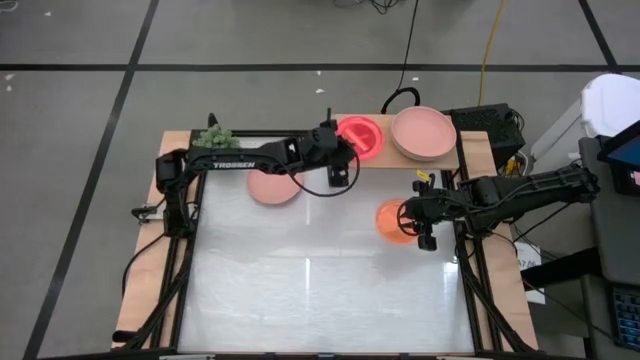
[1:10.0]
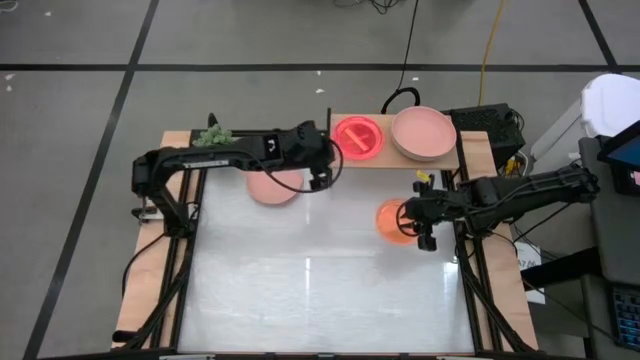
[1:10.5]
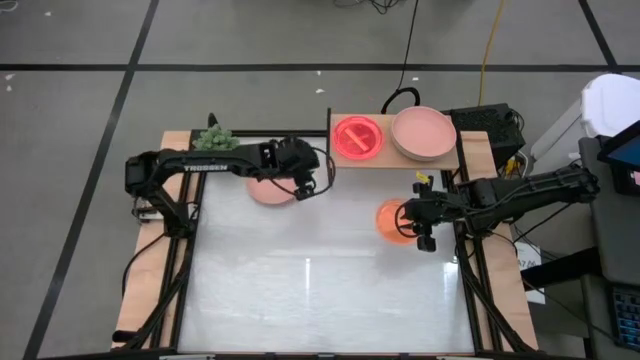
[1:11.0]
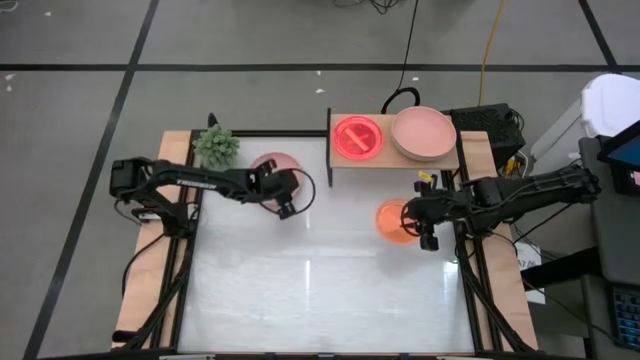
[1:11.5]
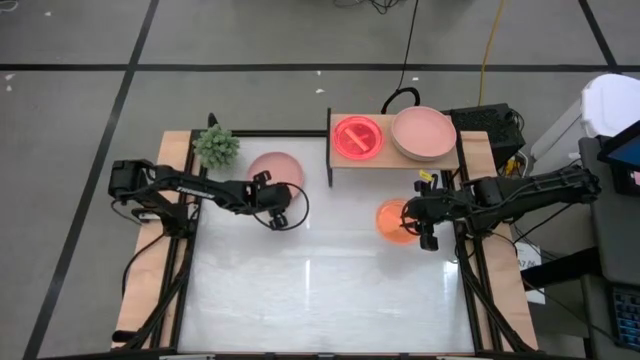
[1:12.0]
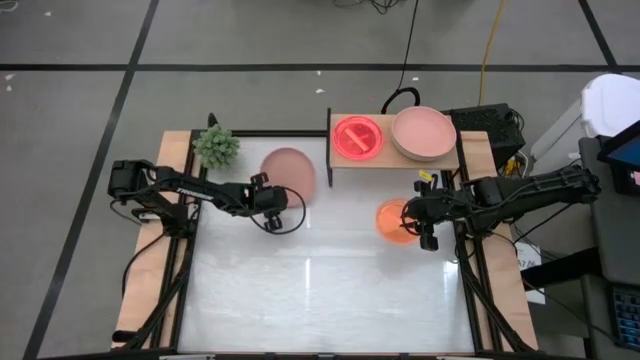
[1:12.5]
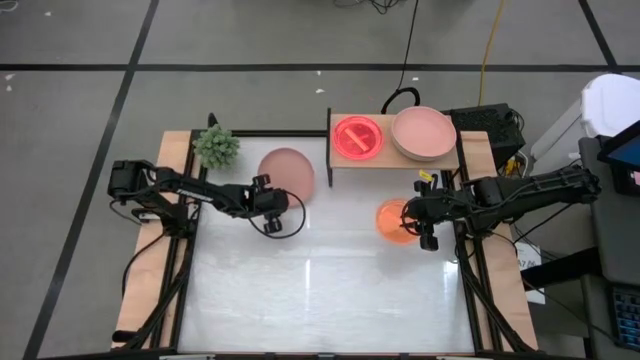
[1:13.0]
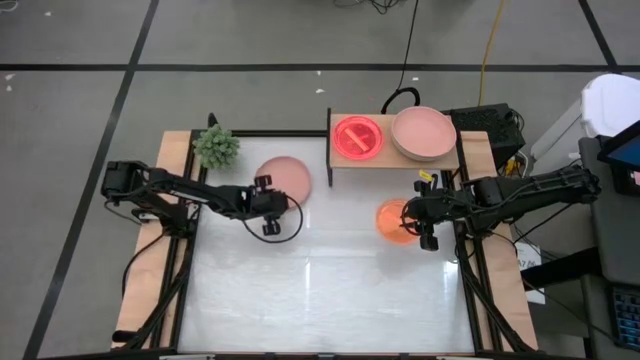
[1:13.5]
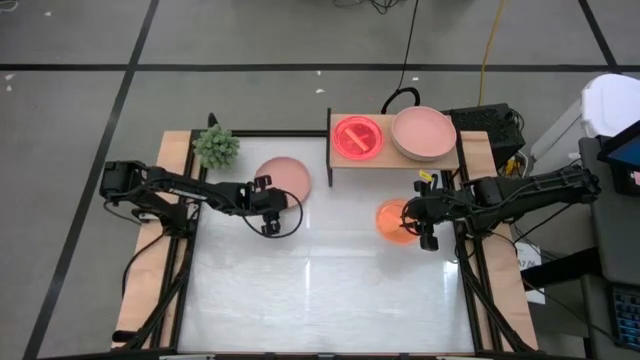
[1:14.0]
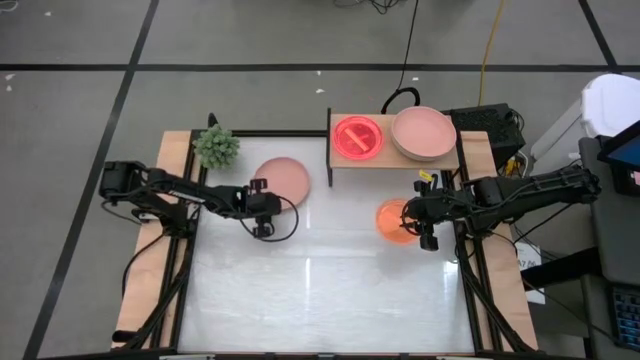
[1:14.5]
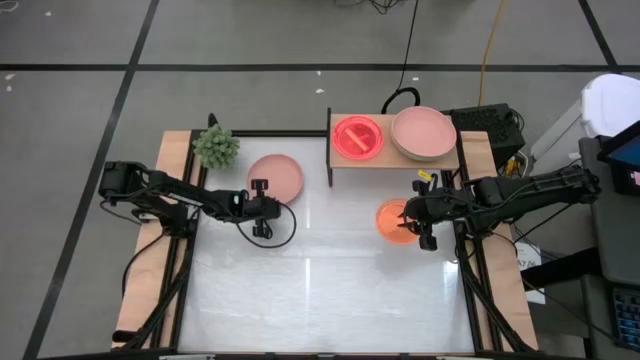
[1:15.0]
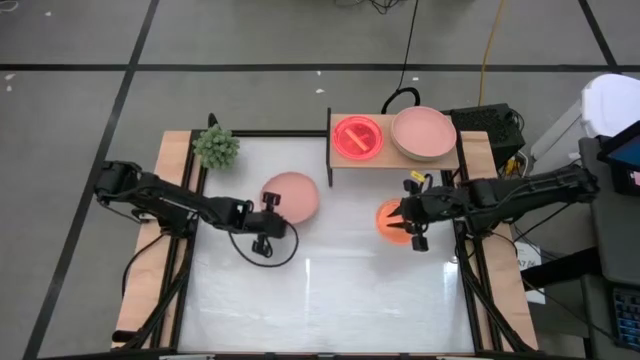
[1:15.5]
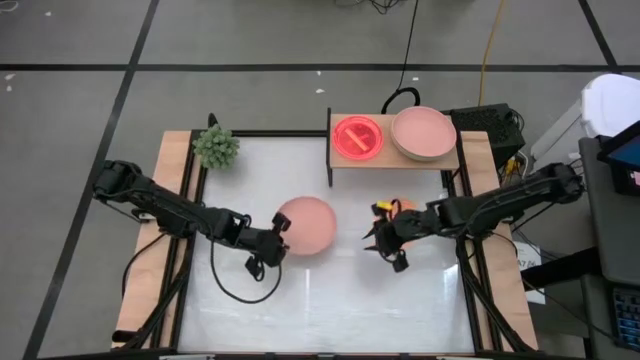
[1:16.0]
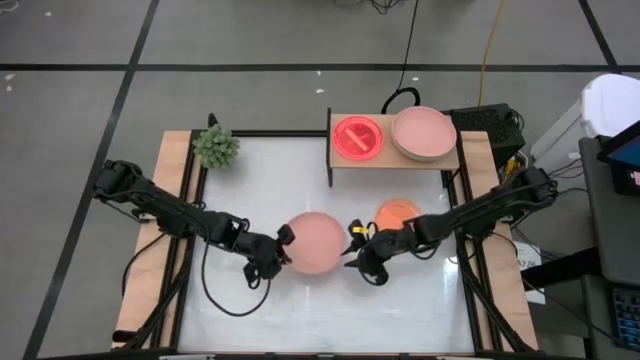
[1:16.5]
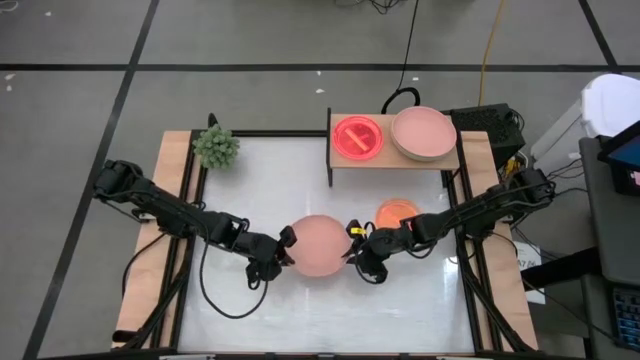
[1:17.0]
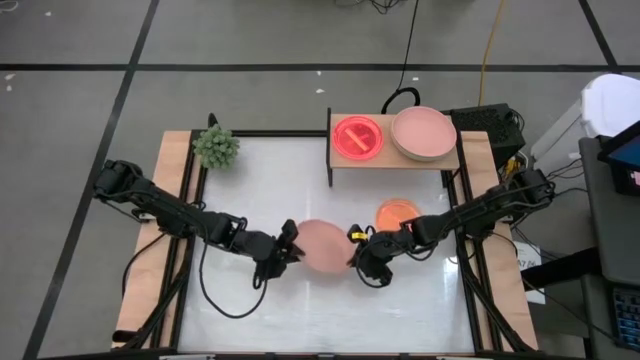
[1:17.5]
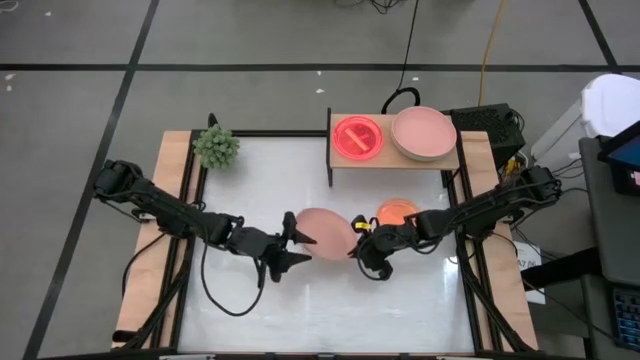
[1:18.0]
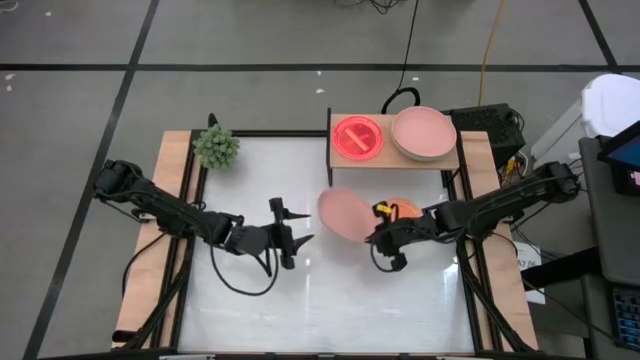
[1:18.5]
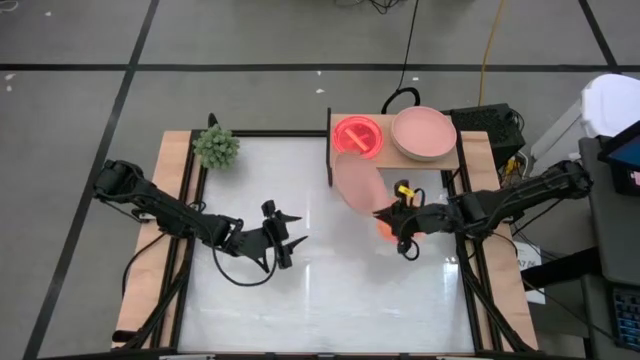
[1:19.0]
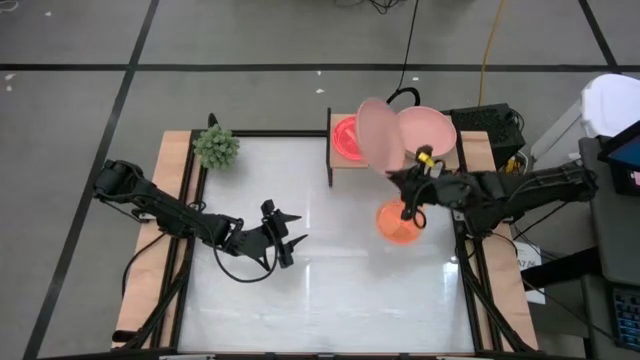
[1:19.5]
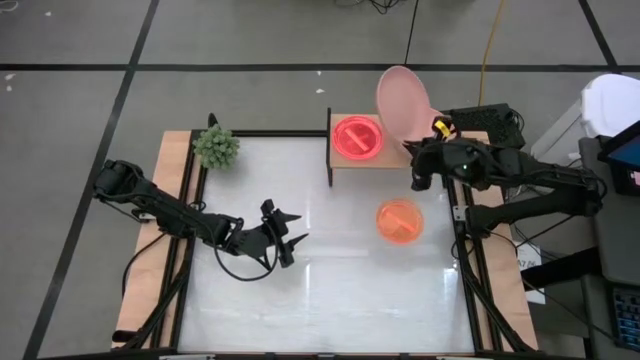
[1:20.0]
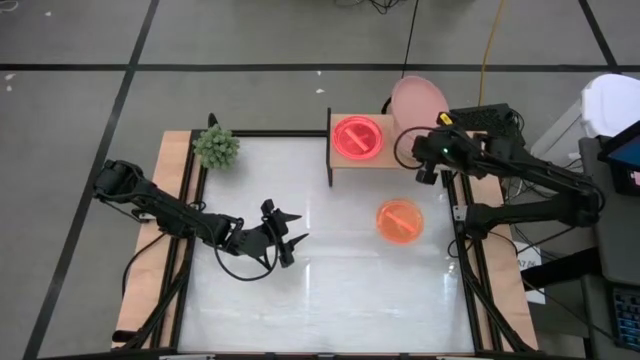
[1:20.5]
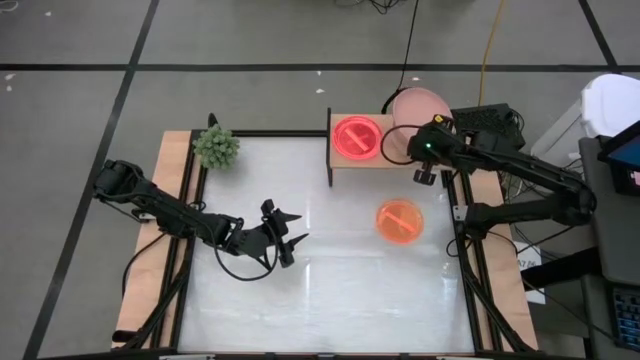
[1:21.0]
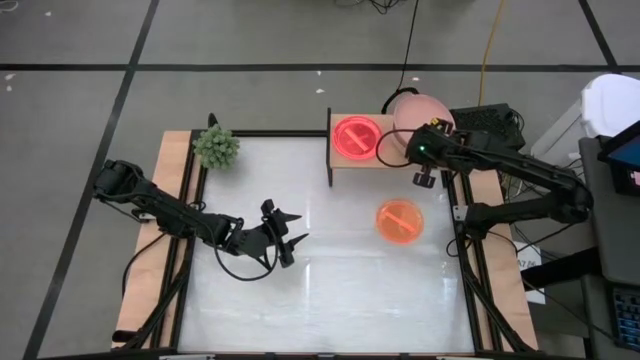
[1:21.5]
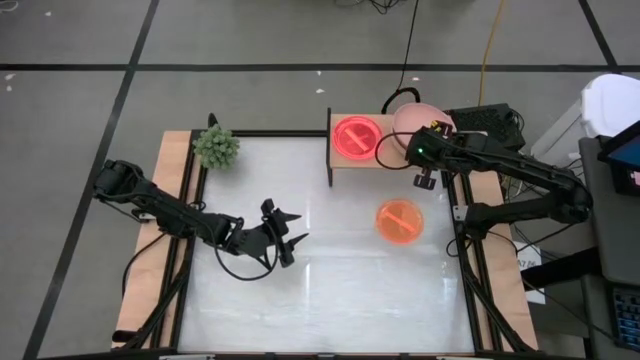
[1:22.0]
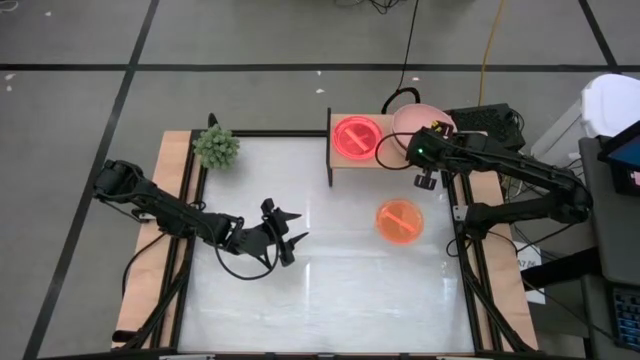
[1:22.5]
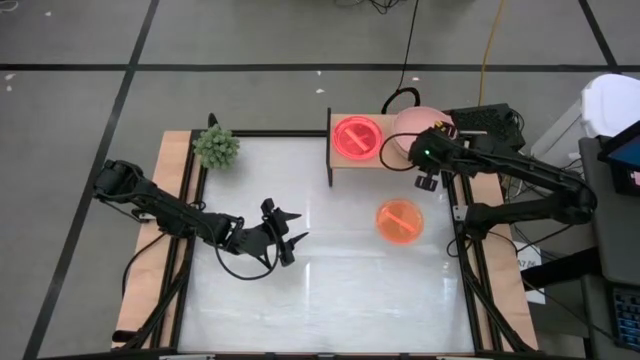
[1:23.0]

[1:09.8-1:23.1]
Task: Place and stack plates onto a shelf
Stack the pink plate on top of the other pink plate on the shelf

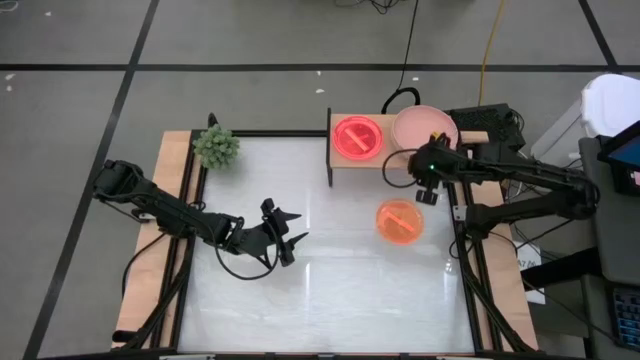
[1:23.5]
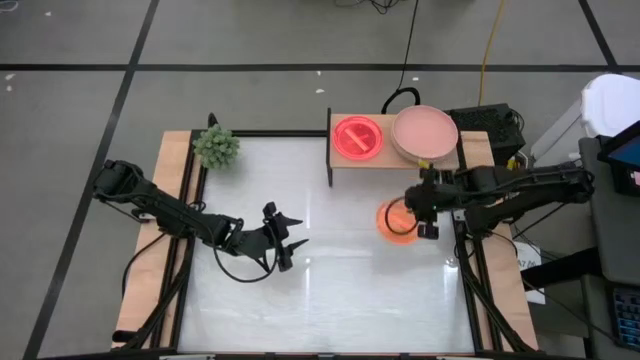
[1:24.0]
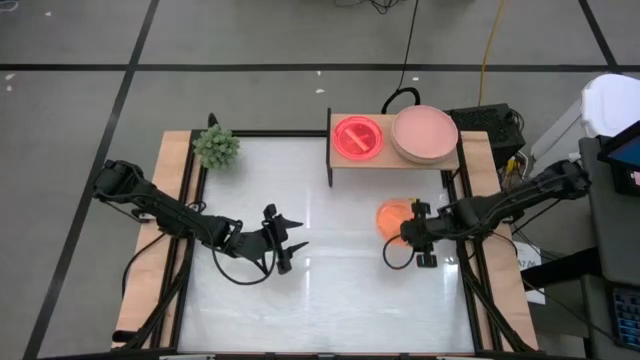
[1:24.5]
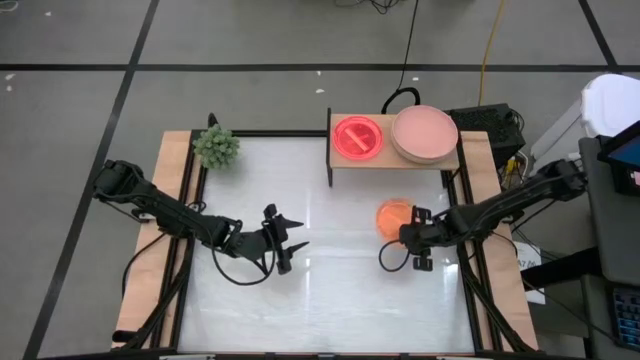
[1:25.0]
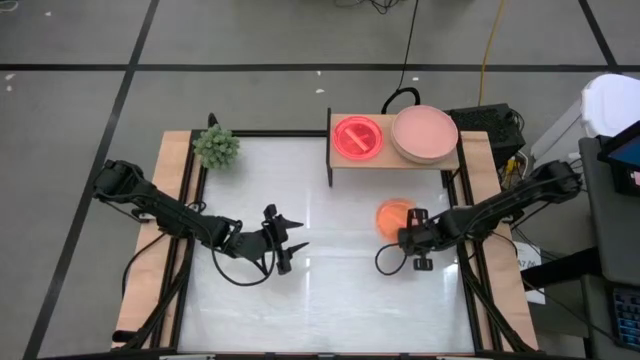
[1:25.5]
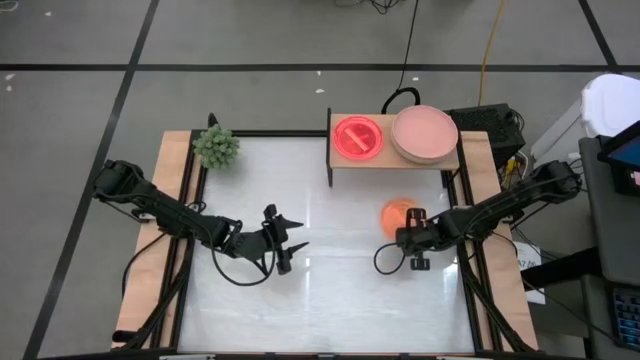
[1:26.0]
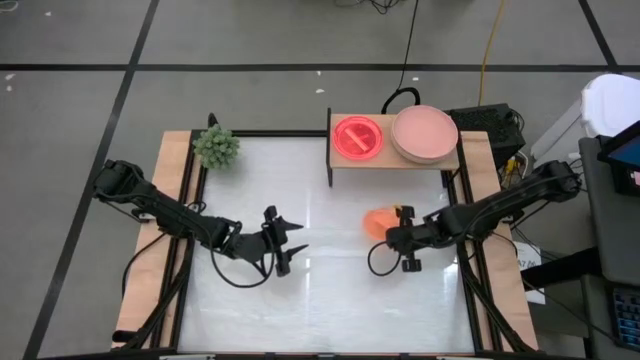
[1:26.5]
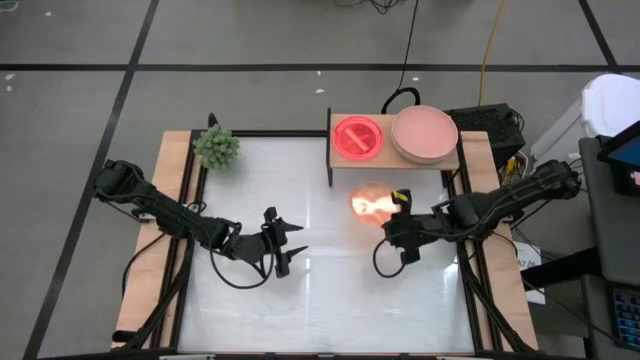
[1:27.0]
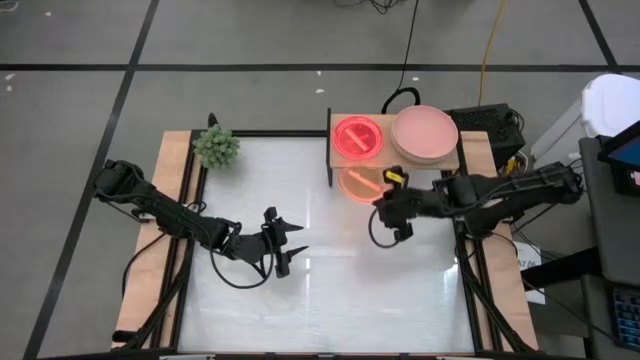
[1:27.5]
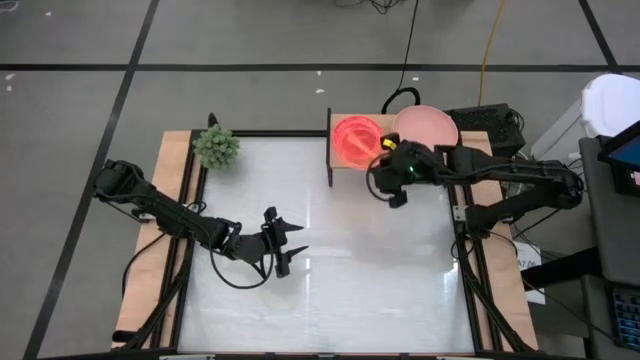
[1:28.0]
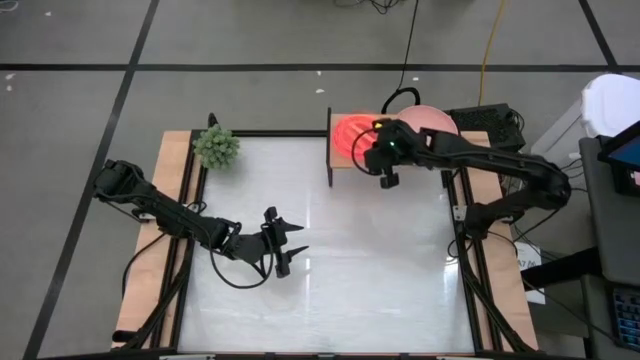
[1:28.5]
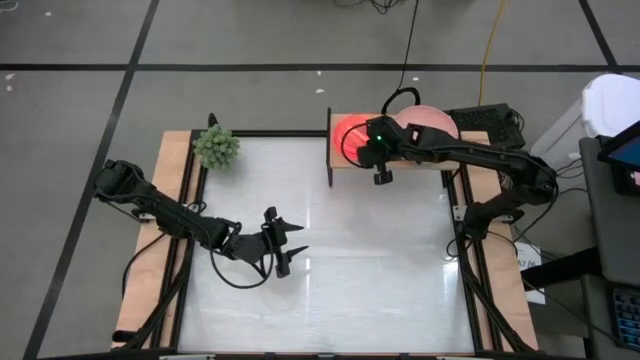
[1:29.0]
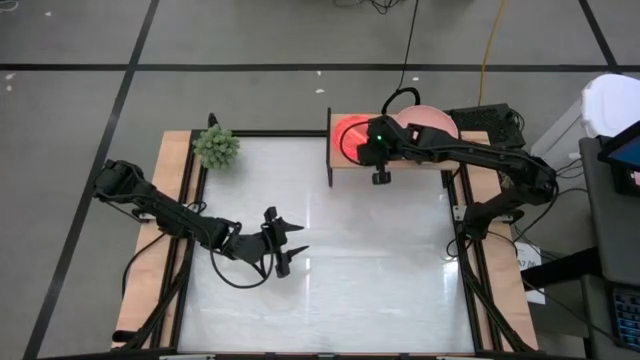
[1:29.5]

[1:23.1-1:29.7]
Stack the orange plate on top of the other orange plate on the shelf

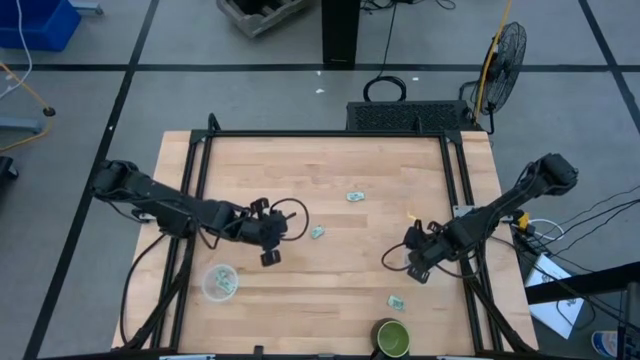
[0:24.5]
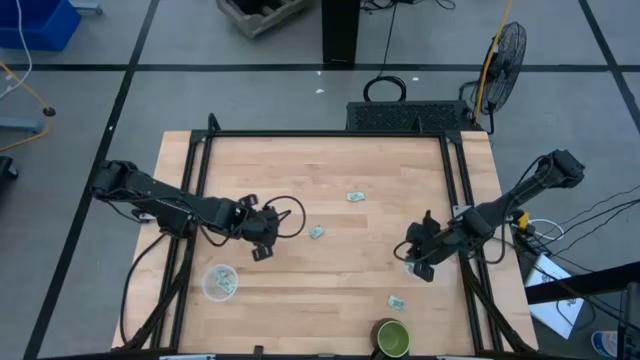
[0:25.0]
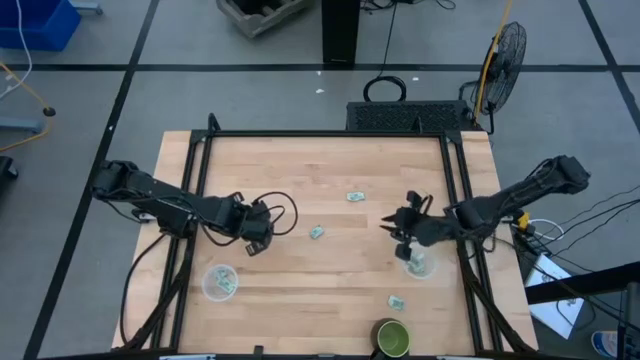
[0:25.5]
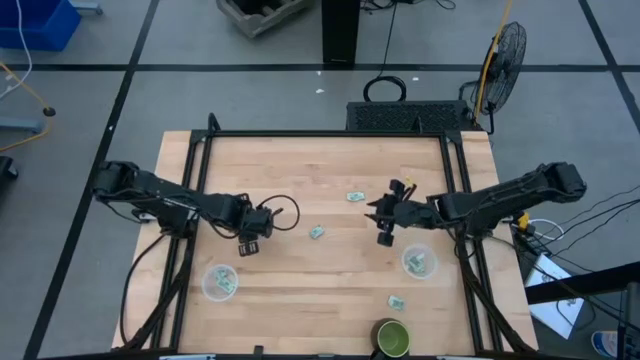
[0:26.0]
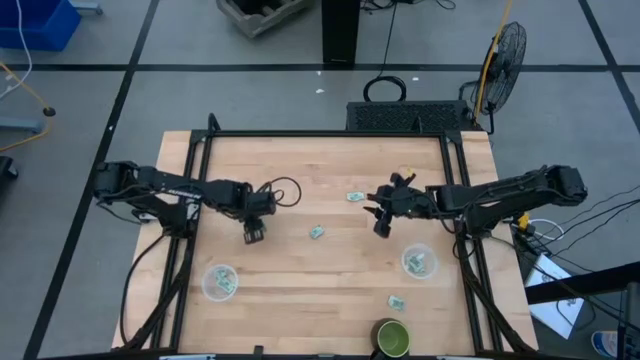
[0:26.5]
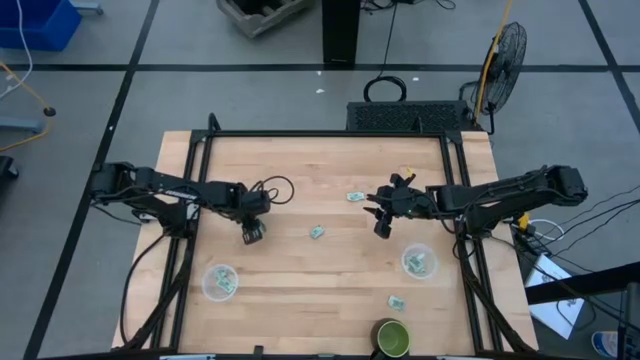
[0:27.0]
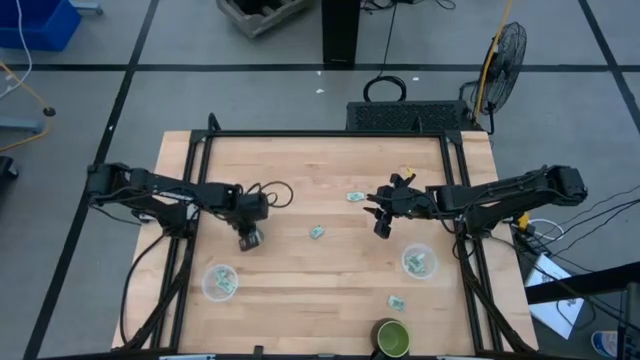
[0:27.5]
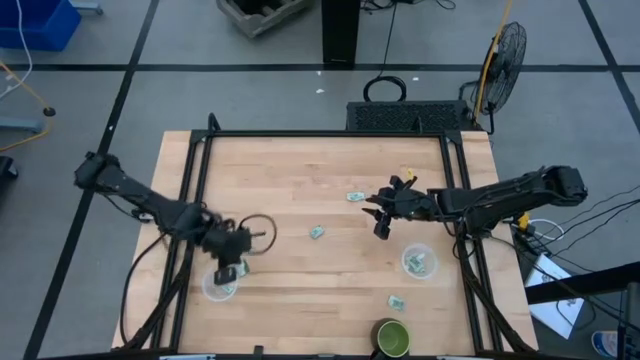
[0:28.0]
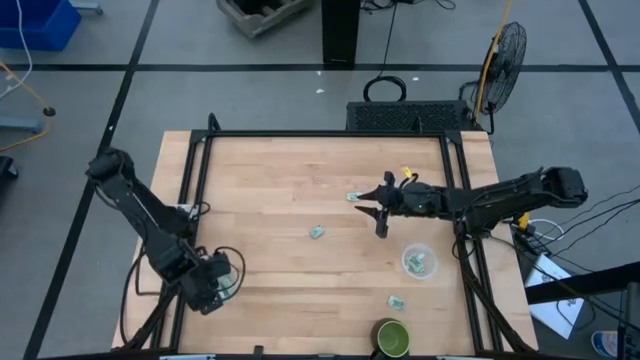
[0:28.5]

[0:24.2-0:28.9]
Task: Pick and place Stevia / Truvia into bins
Put the Stevia packet into the right transparent plastic container
